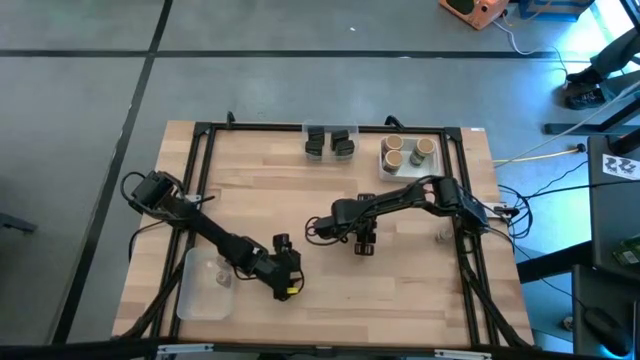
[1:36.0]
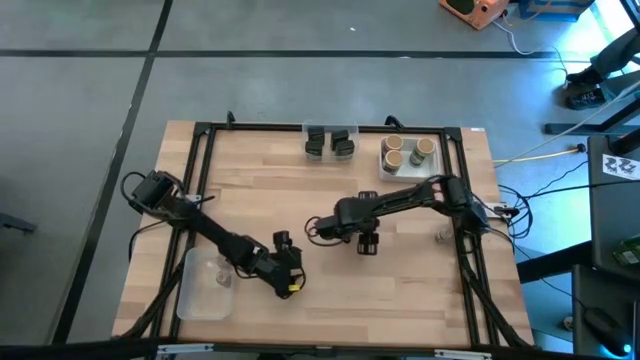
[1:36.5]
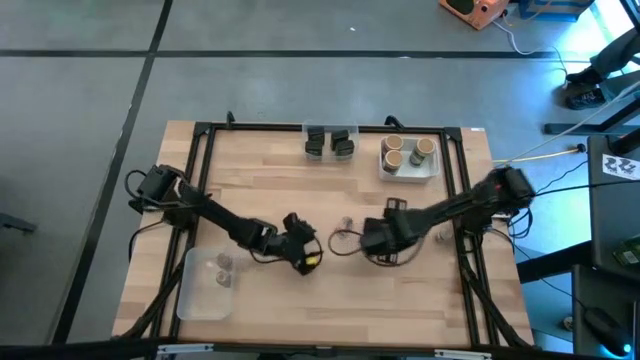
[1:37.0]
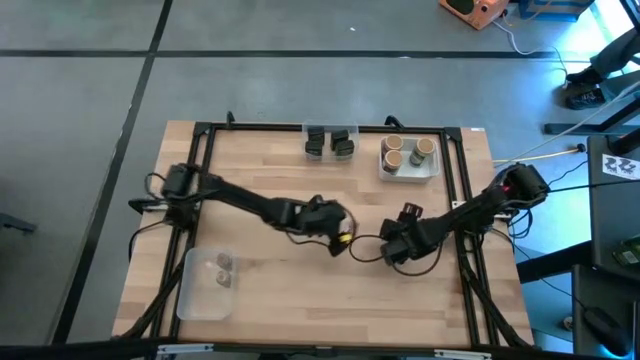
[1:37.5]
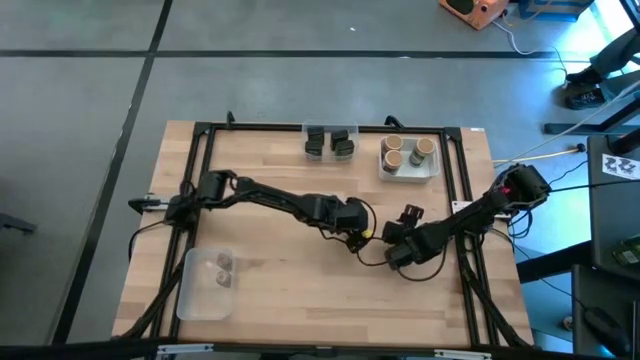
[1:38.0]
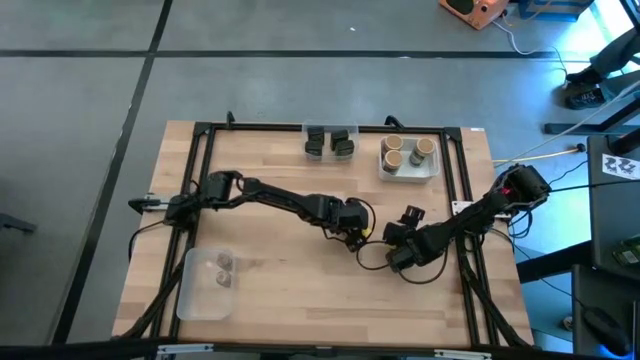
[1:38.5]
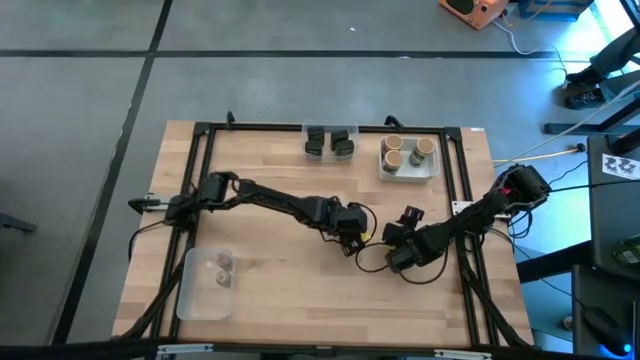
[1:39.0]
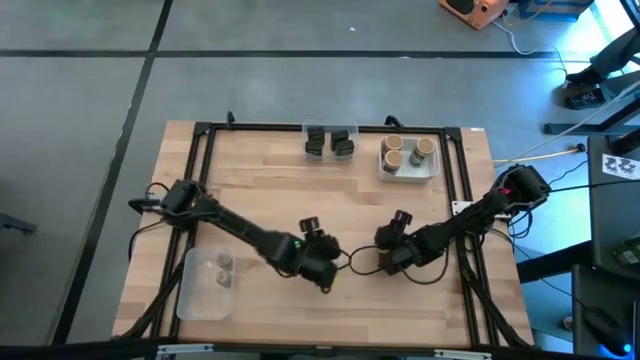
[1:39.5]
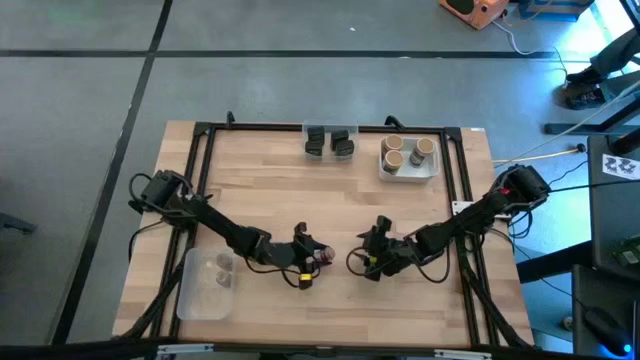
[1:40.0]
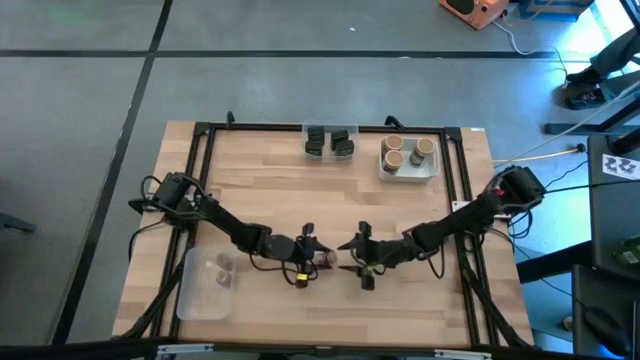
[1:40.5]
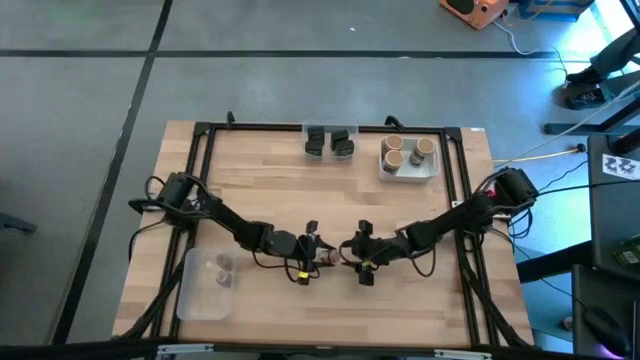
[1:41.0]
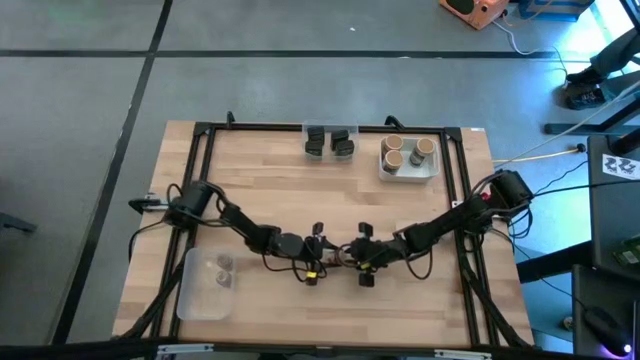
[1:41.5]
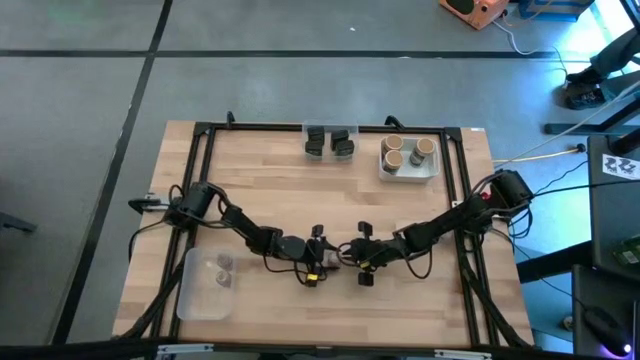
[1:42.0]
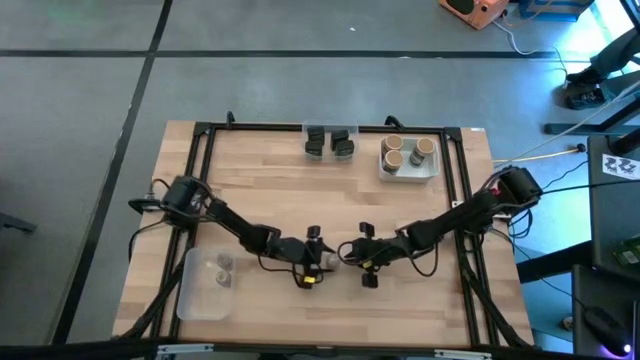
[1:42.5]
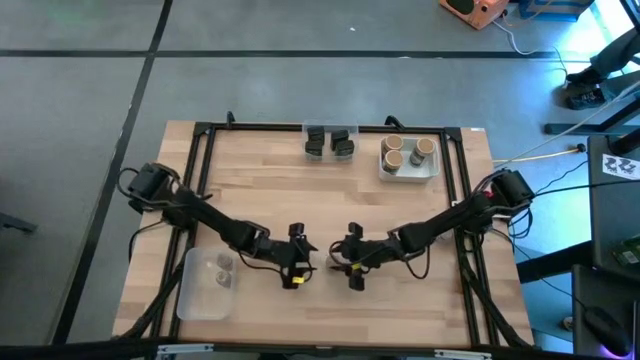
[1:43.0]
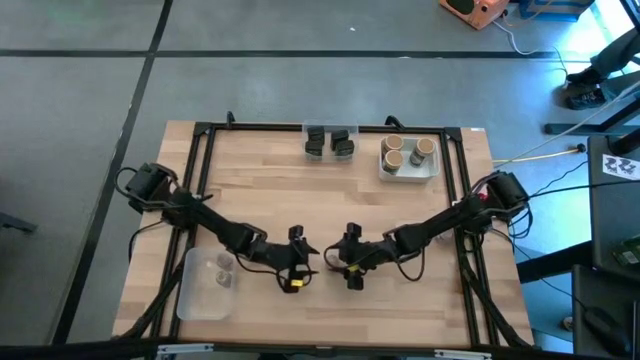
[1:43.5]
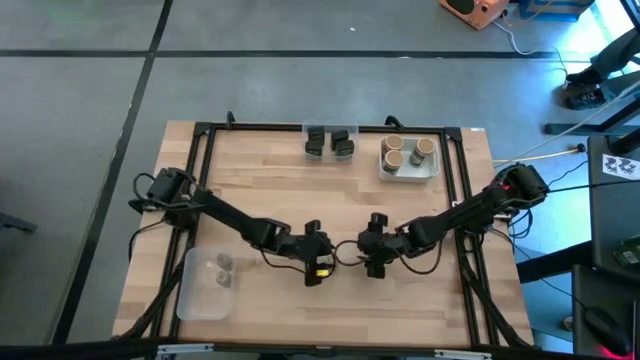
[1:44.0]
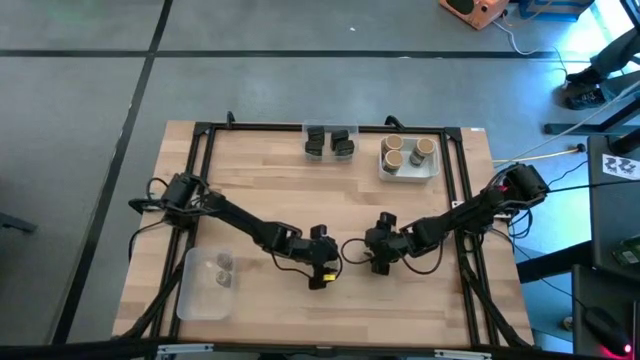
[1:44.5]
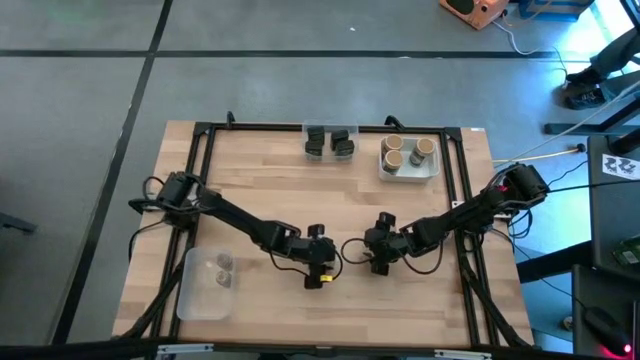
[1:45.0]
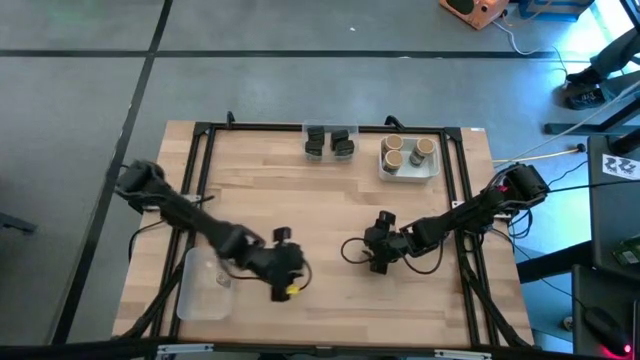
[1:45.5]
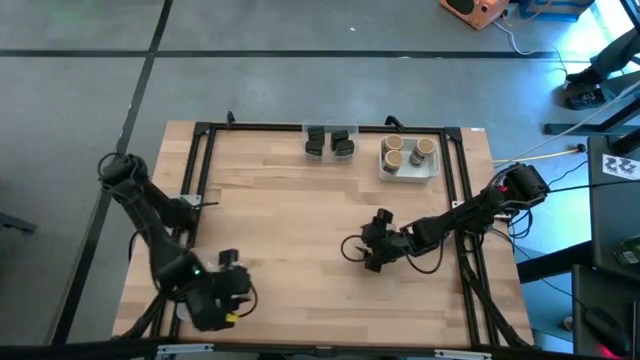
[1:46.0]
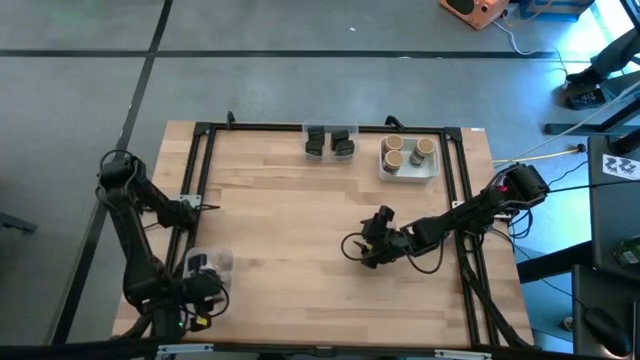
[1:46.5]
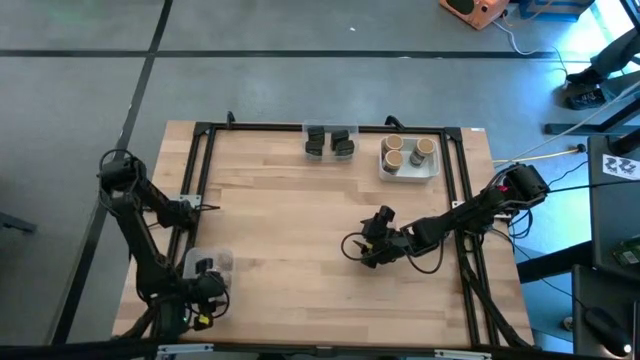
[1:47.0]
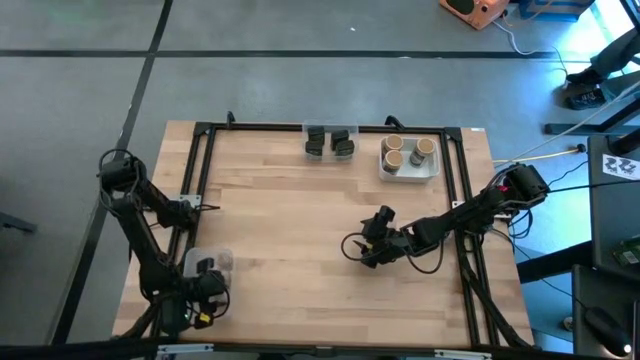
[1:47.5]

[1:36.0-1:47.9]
Task: Sort spices by type
Put the top transparent seasoning bottle into the left transparent bin

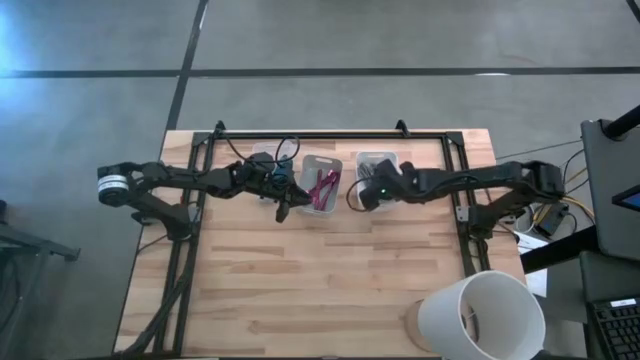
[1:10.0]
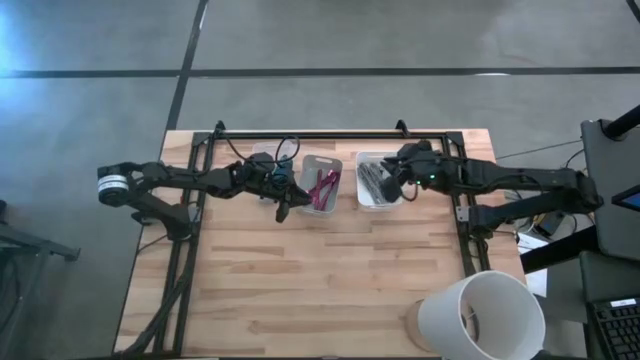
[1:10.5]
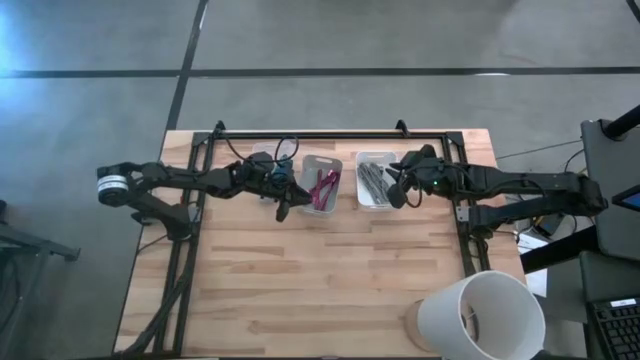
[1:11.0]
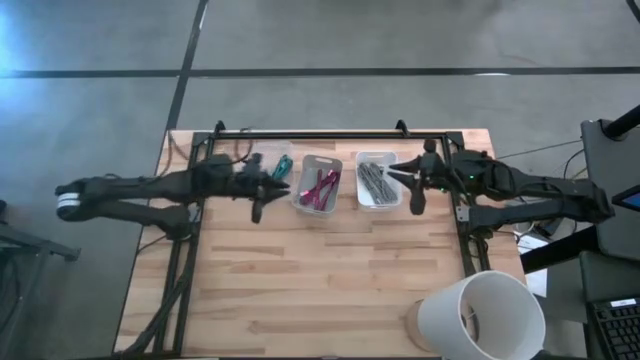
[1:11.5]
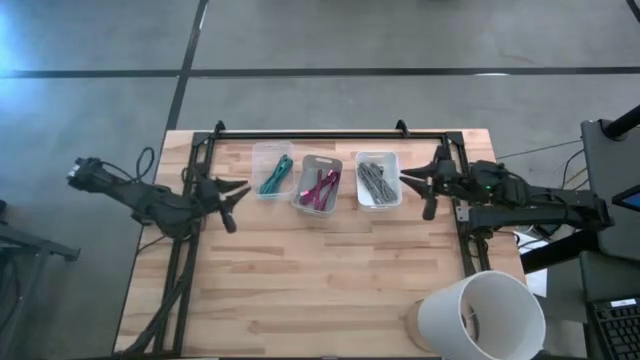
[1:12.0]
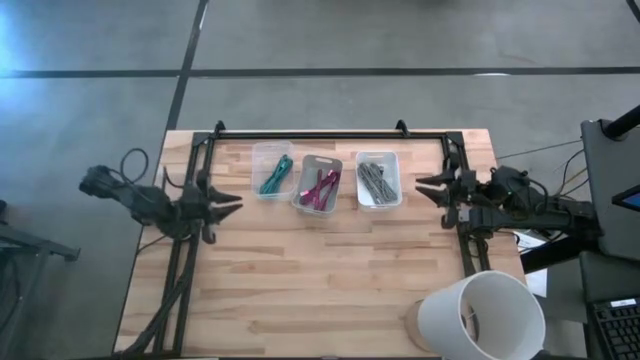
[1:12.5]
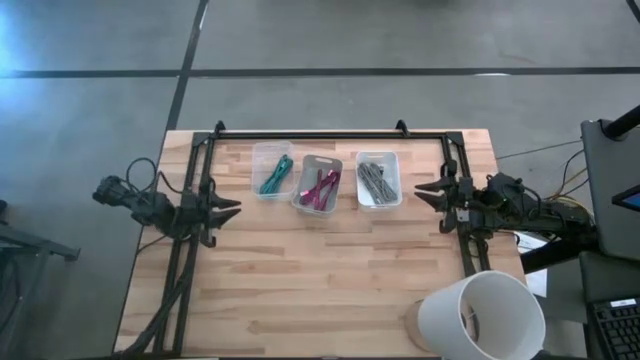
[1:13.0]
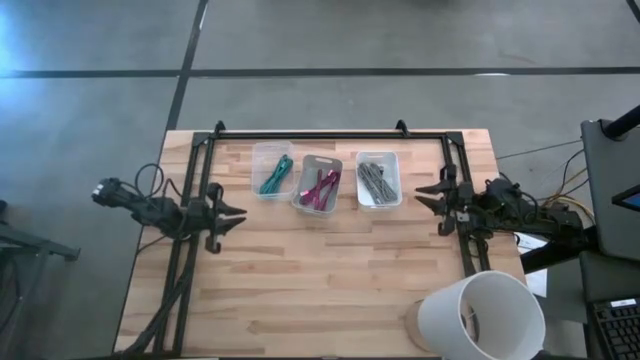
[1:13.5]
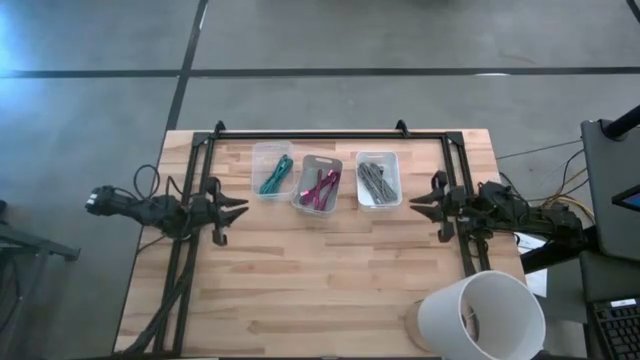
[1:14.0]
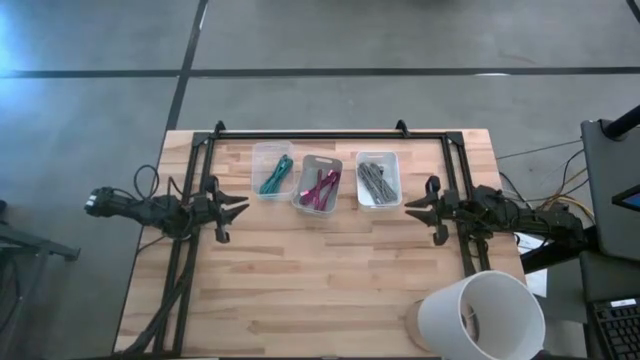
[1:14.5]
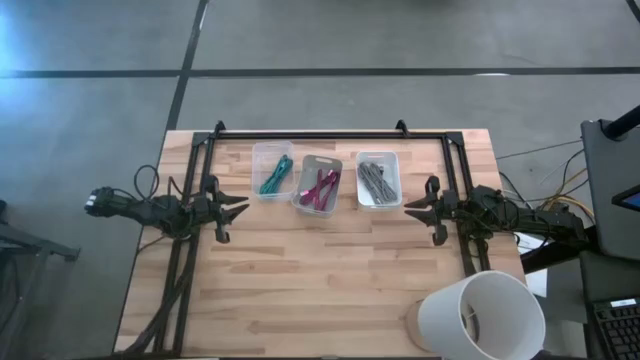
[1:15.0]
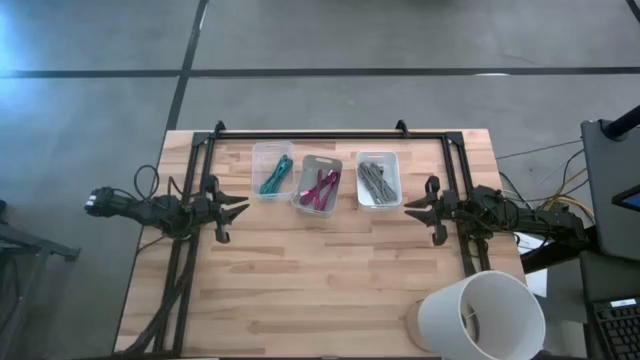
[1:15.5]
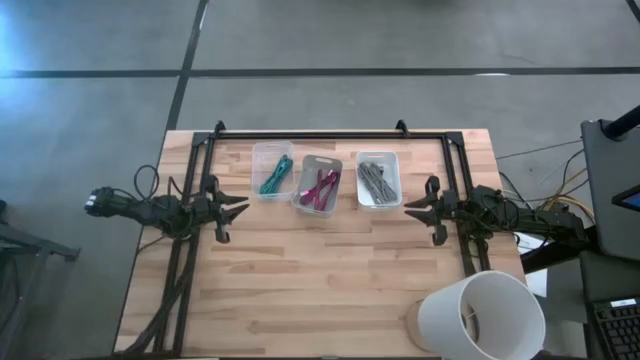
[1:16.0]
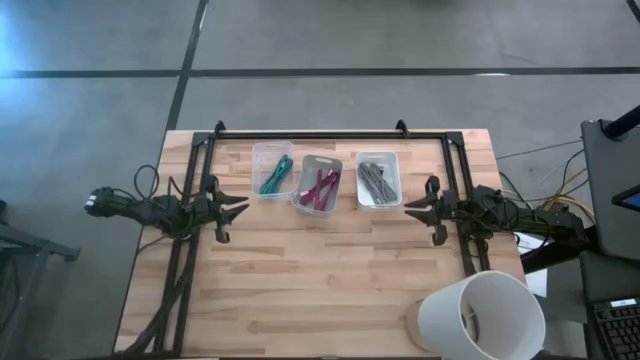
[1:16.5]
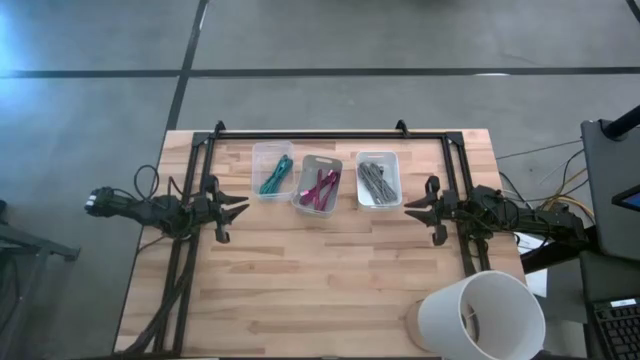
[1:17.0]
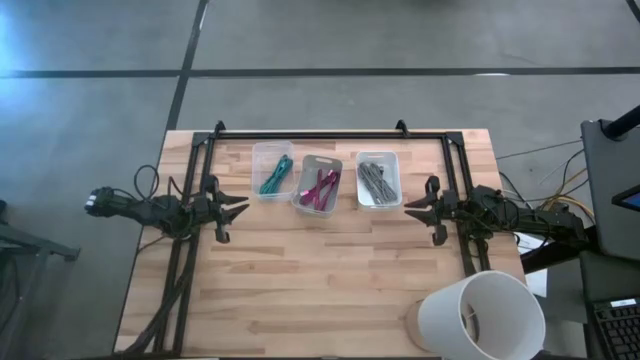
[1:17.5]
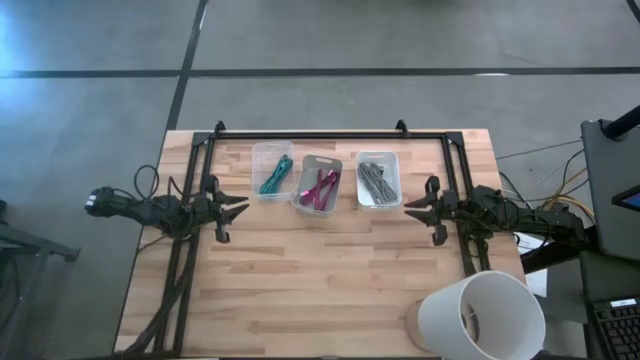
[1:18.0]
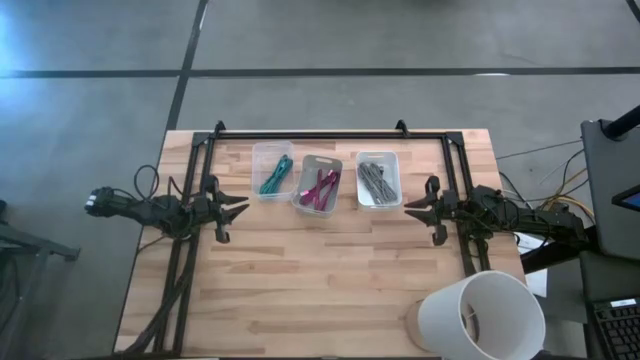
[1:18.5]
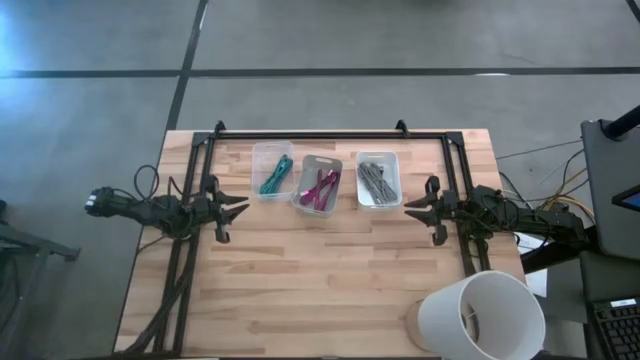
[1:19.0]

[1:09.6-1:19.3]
Task: Pick & Place USB Port
Return to Home Position
